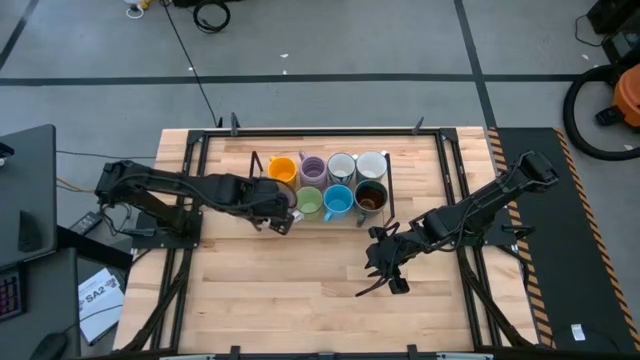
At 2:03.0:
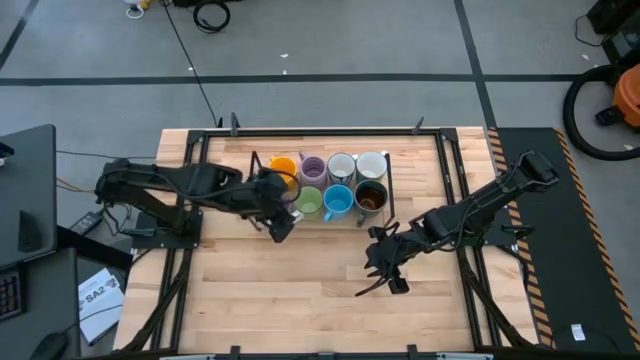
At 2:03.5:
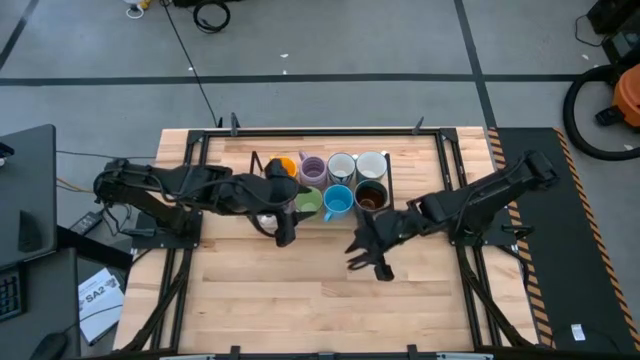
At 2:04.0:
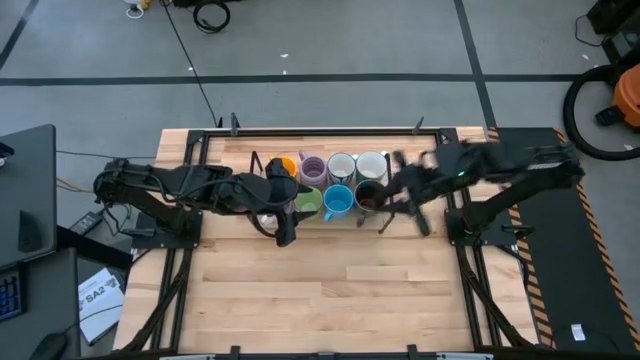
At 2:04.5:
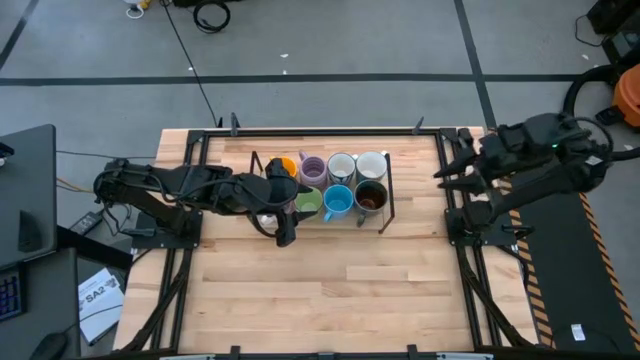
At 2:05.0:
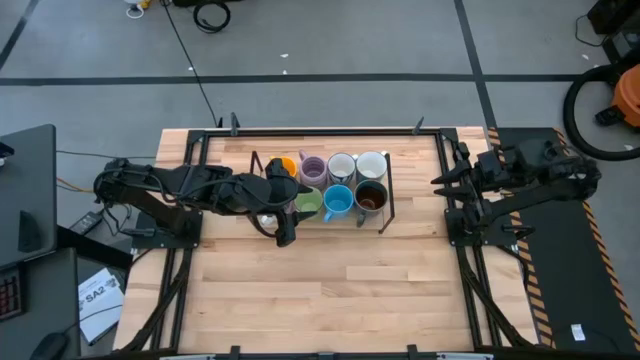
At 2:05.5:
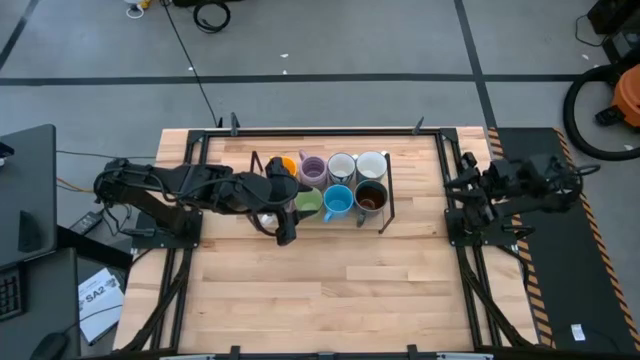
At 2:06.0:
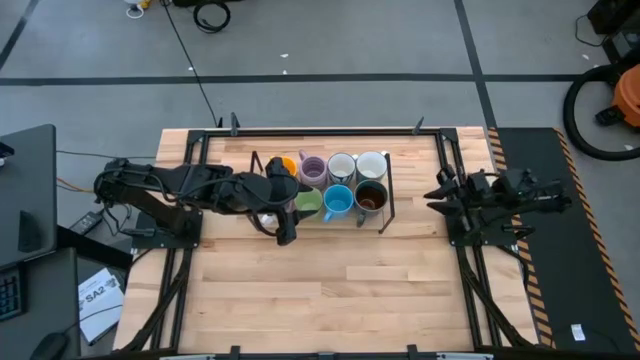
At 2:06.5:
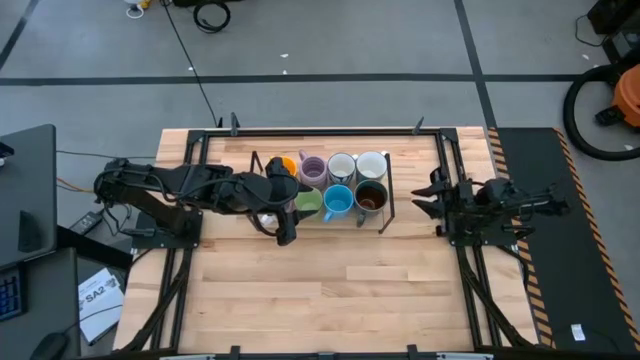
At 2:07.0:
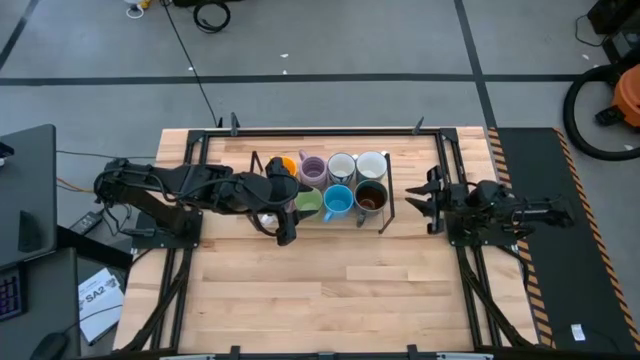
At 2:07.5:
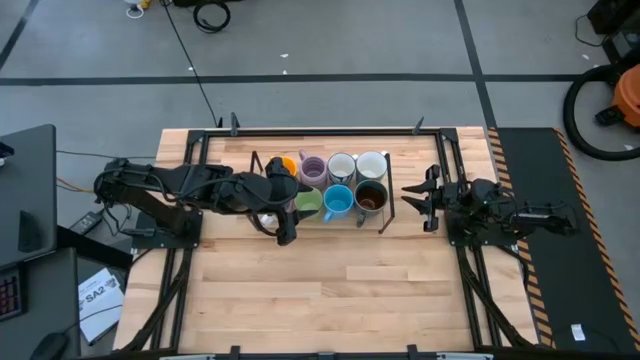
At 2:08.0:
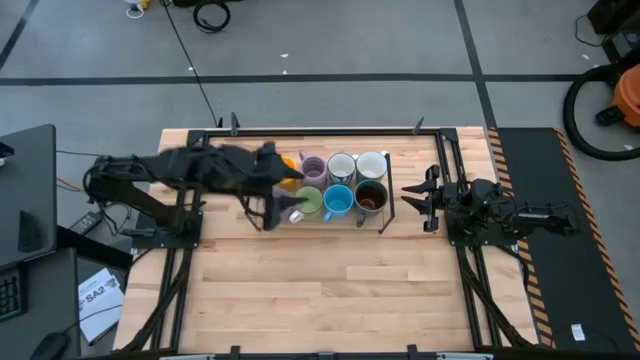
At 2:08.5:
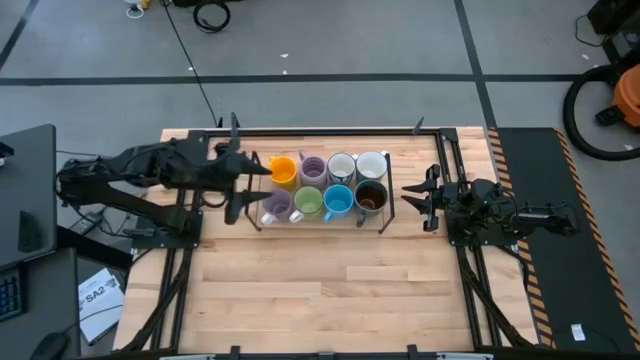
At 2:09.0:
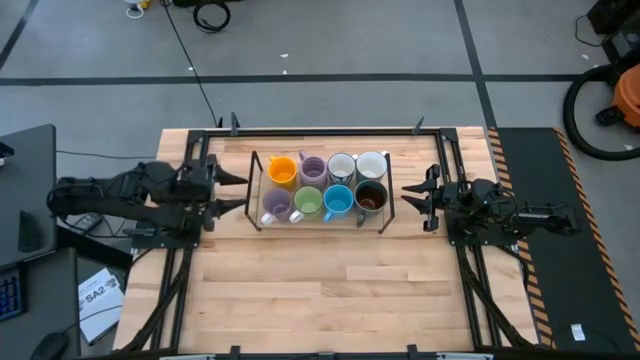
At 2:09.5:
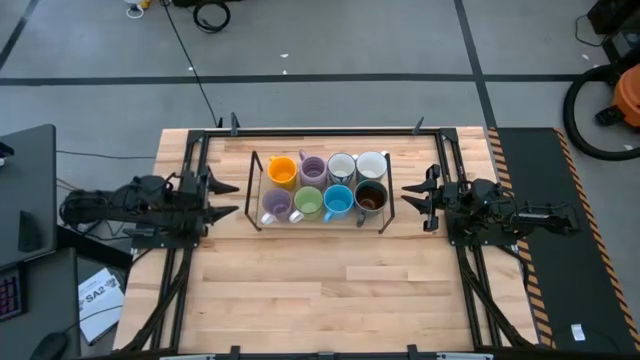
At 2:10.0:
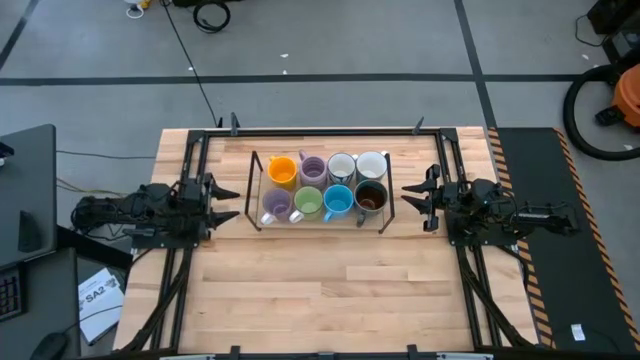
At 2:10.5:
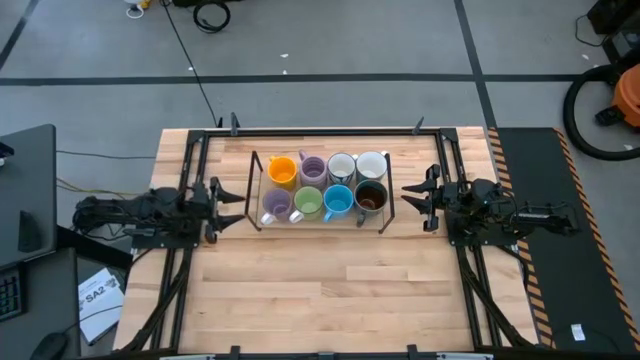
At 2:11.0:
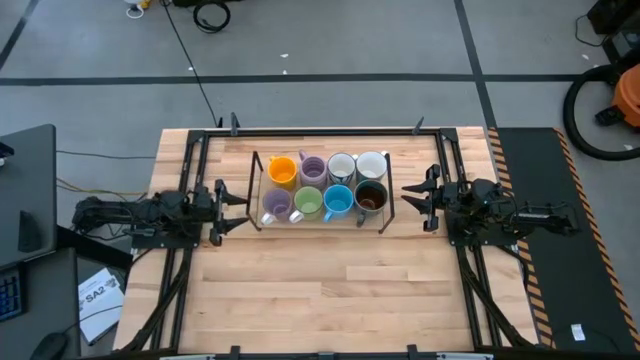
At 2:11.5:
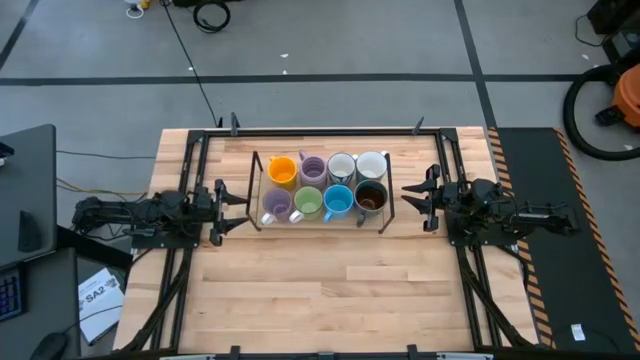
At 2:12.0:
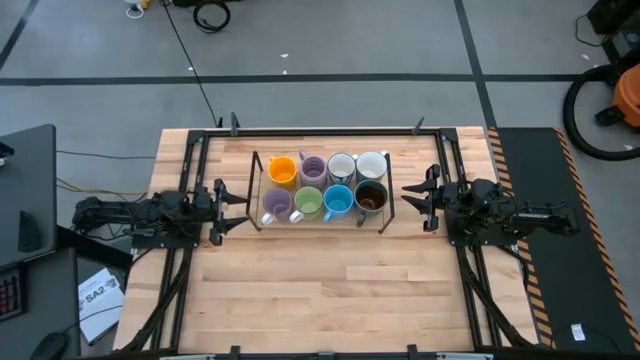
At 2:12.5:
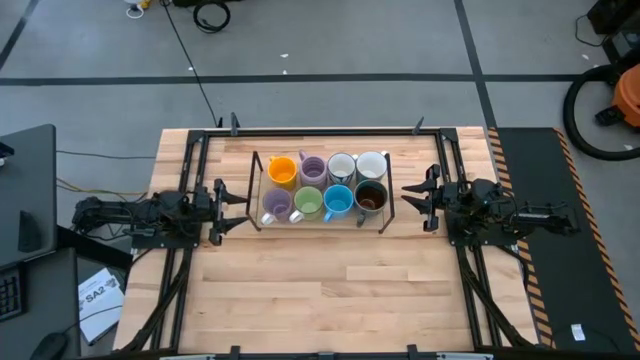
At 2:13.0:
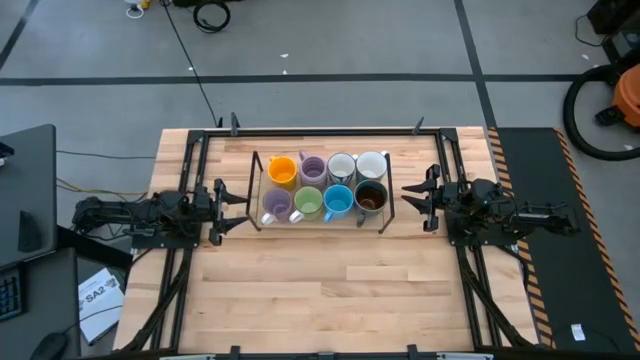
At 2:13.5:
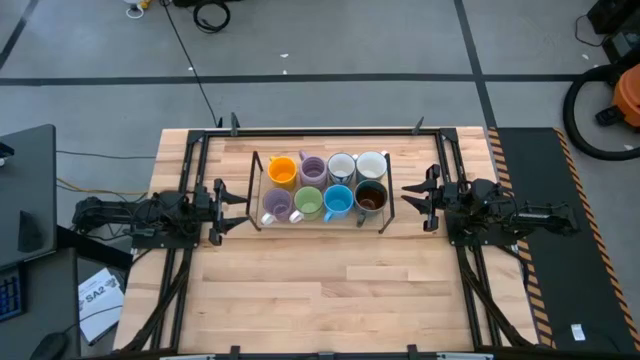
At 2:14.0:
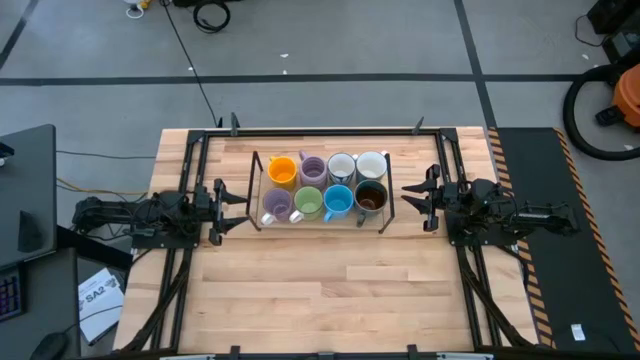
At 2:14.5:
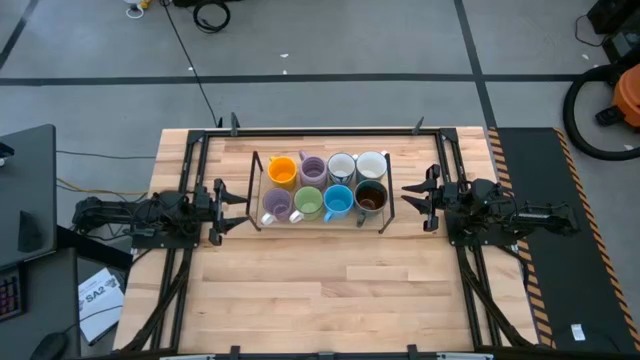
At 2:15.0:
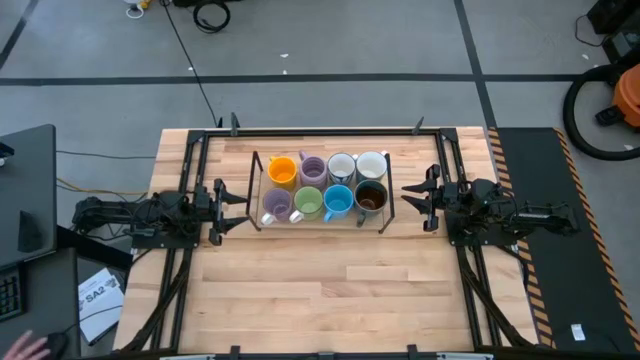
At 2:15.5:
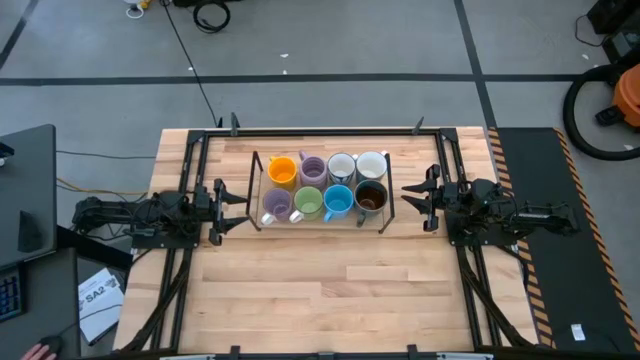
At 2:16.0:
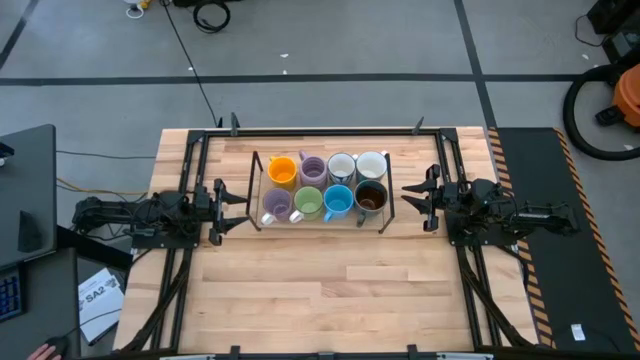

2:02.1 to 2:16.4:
Task: Place coffee mugs
Return to Home Position
